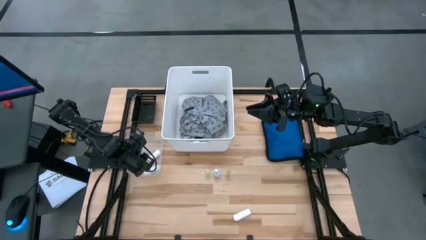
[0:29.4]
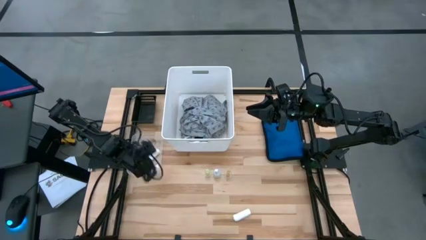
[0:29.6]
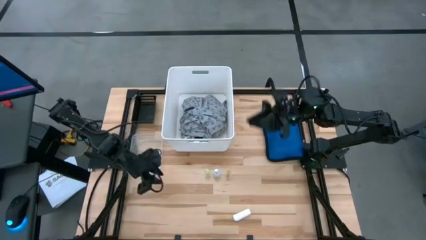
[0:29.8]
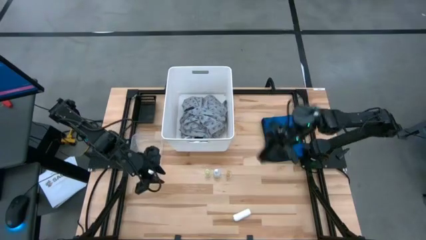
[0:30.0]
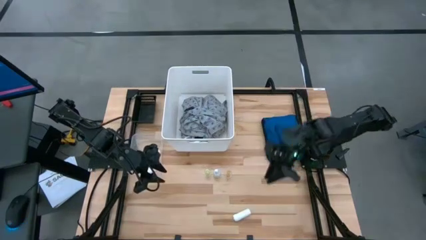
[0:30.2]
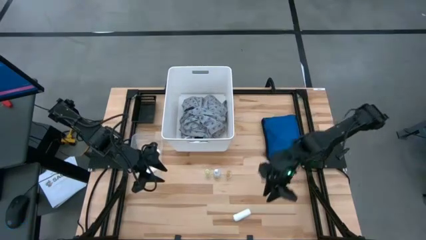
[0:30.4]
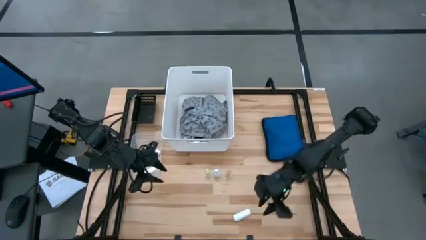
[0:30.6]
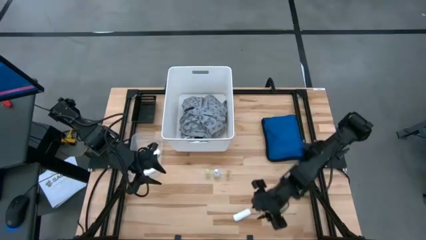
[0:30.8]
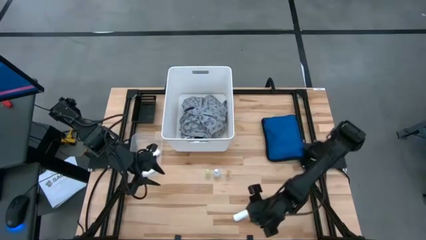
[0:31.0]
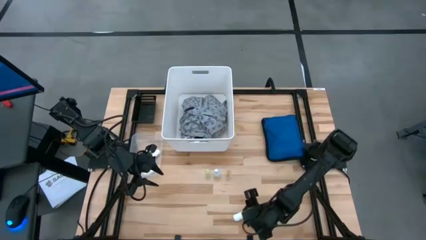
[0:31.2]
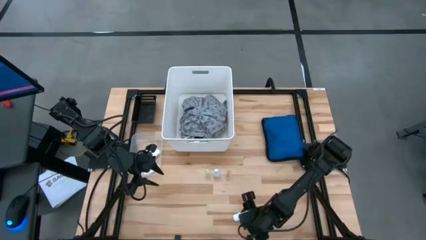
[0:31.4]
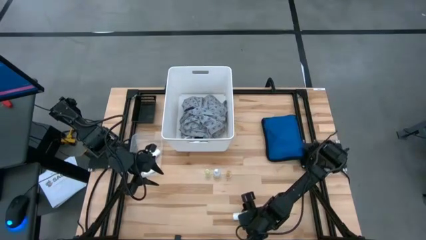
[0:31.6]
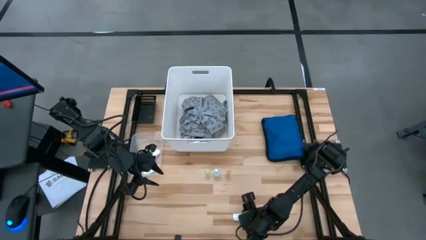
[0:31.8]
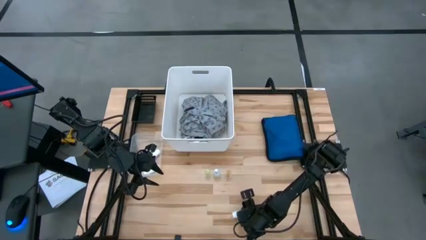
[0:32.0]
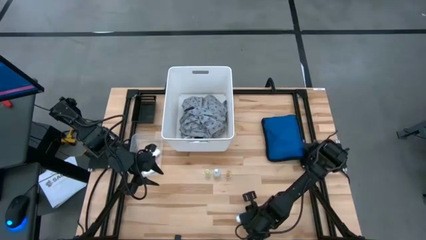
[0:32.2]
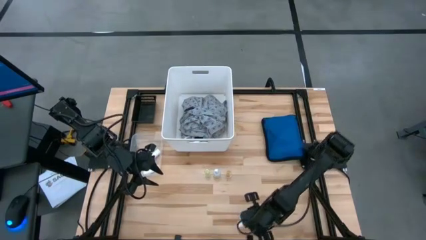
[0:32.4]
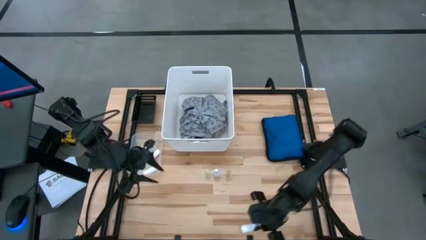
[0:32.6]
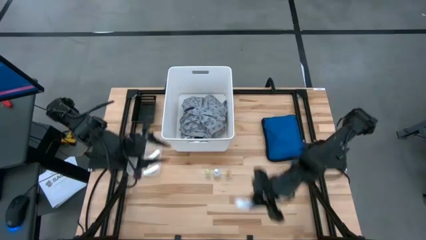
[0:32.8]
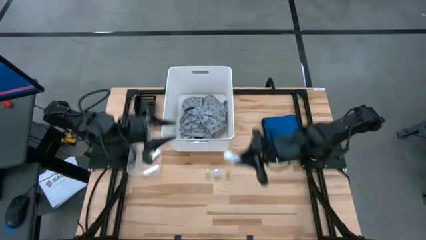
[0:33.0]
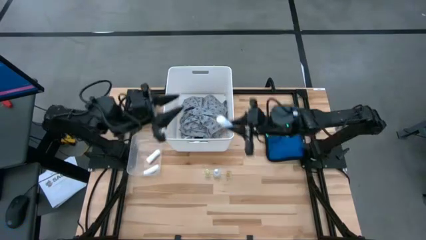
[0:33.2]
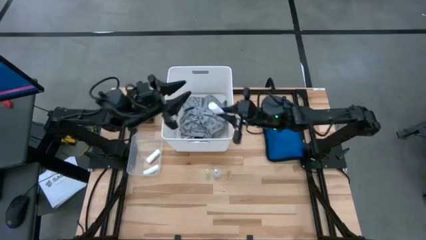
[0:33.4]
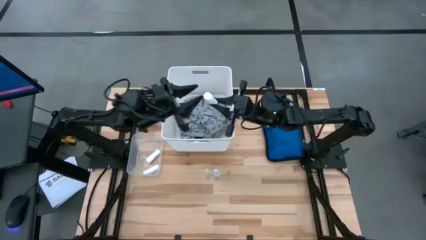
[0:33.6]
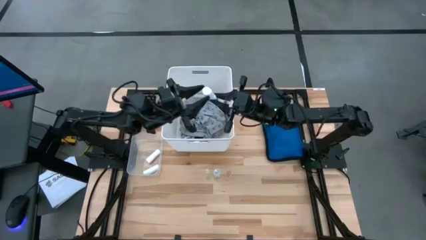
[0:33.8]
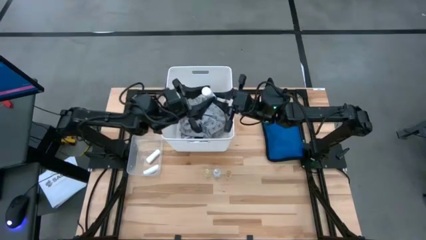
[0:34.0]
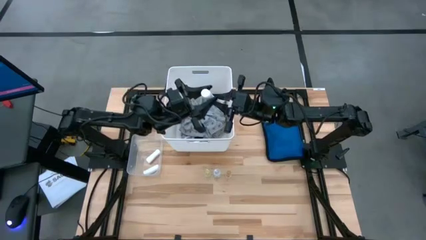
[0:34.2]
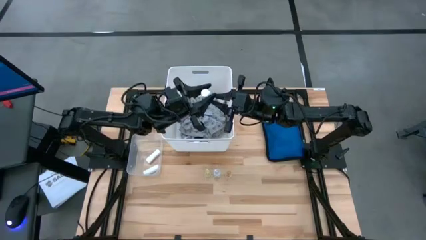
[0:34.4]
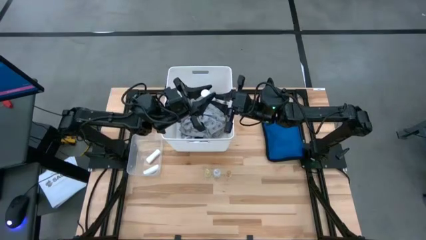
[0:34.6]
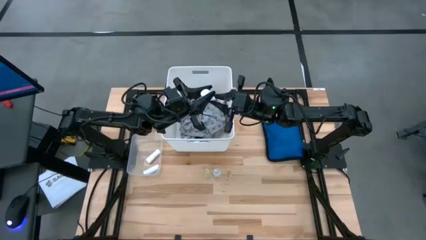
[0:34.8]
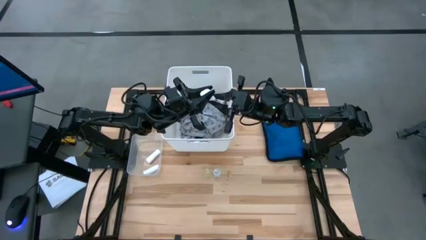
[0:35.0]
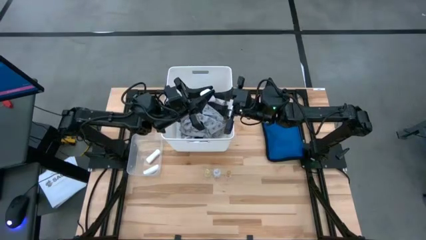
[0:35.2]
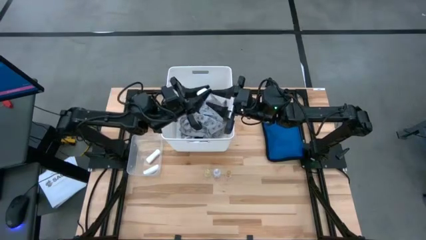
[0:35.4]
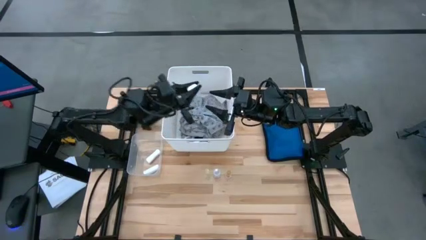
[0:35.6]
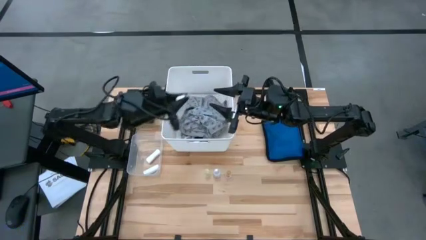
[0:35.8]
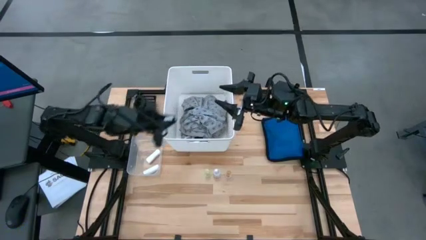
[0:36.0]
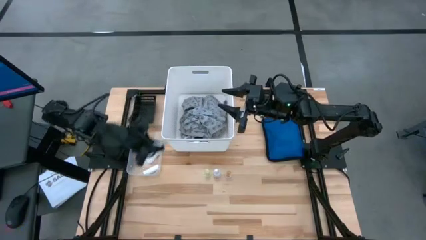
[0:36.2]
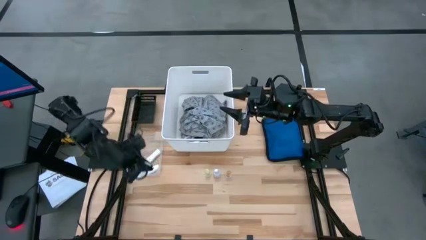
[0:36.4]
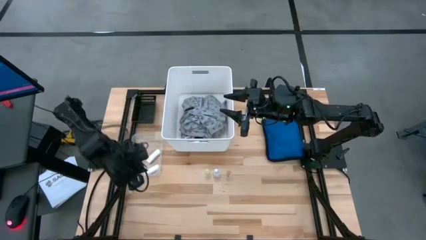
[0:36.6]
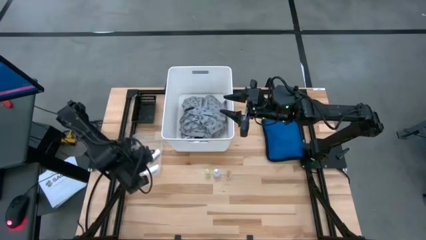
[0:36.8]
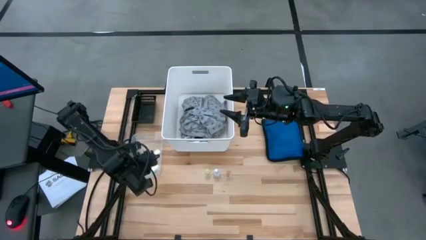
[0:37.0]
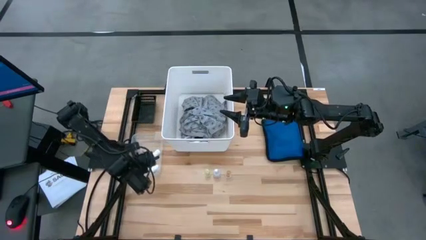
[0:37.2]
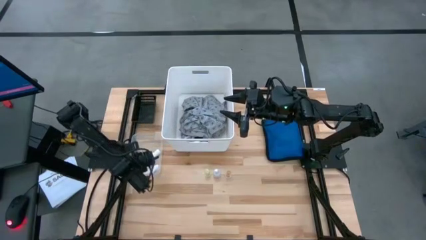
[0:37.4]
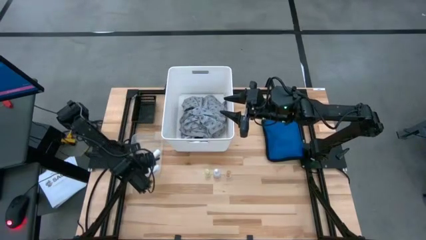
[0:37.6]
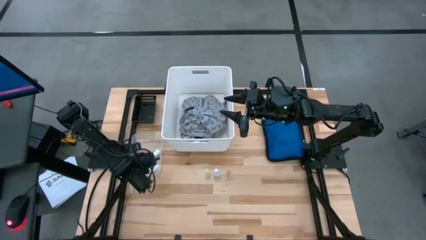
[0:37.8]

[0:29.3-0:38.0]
Task: Pick & Place Medicine items
Put the rolled gauze into the transparent bin

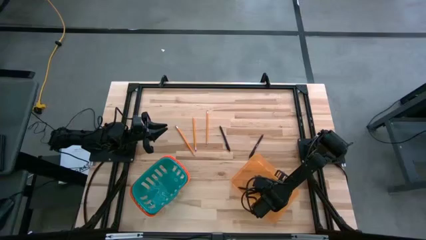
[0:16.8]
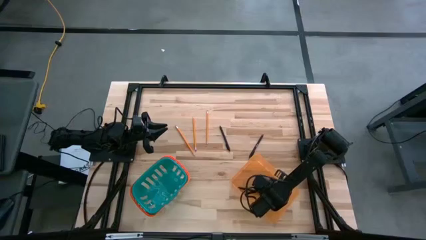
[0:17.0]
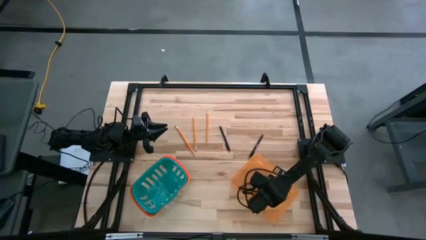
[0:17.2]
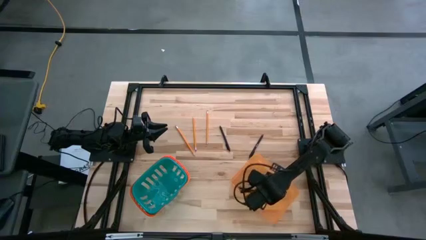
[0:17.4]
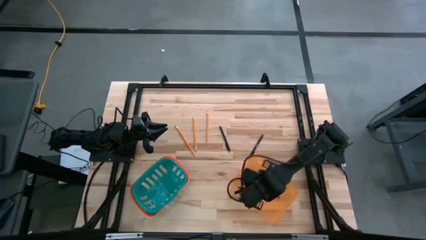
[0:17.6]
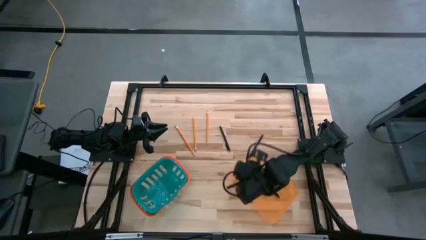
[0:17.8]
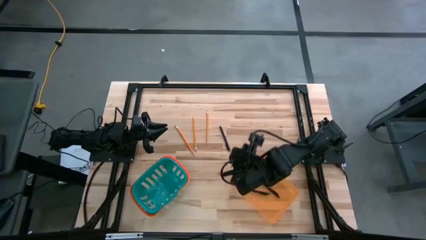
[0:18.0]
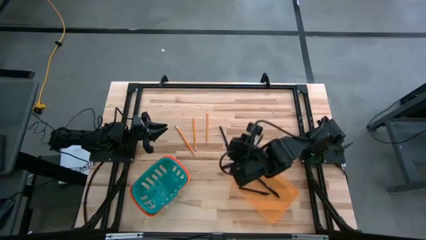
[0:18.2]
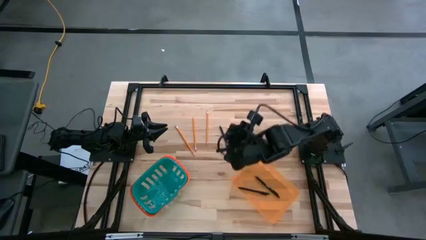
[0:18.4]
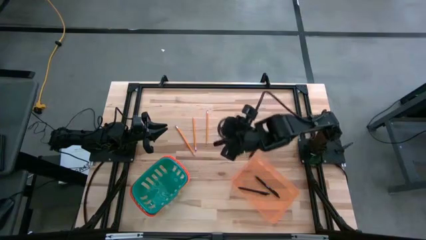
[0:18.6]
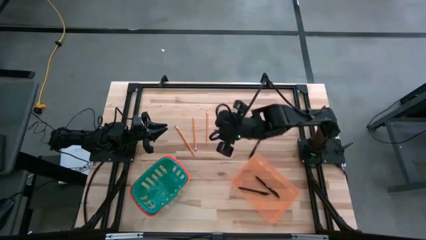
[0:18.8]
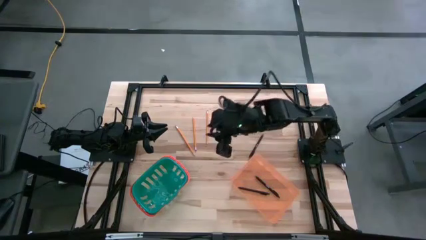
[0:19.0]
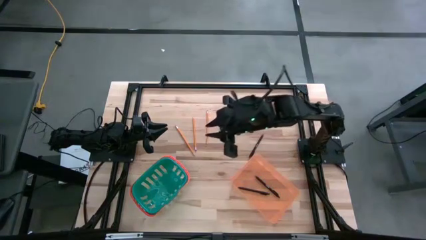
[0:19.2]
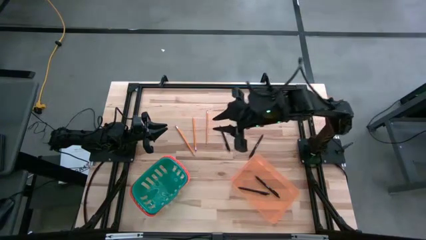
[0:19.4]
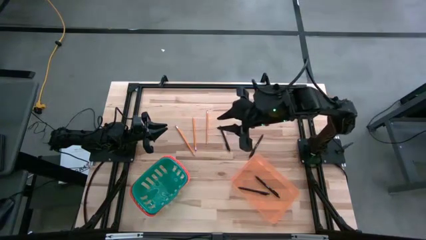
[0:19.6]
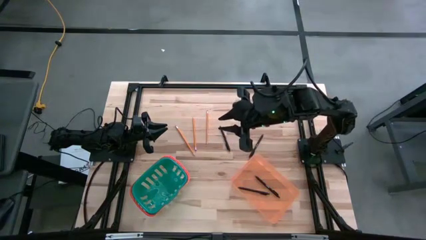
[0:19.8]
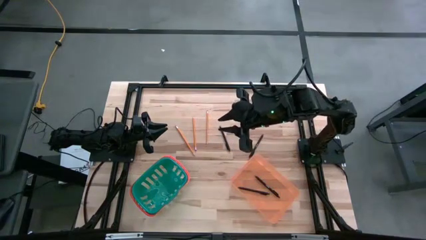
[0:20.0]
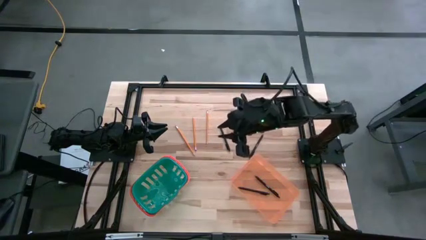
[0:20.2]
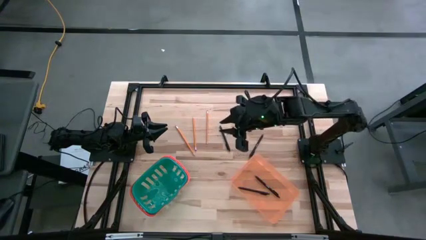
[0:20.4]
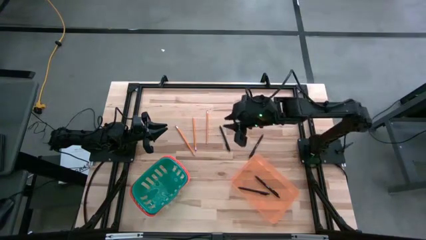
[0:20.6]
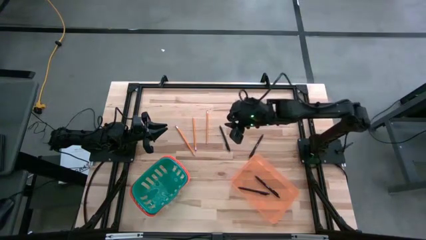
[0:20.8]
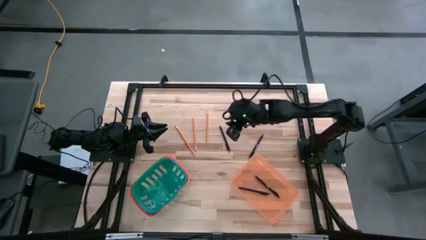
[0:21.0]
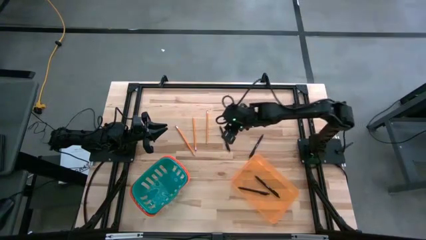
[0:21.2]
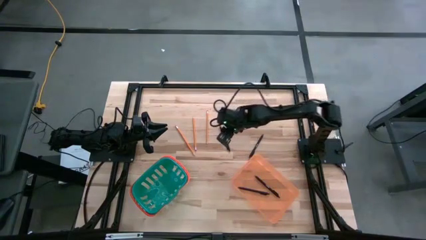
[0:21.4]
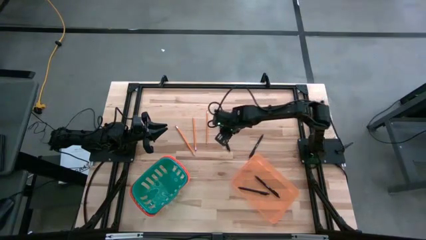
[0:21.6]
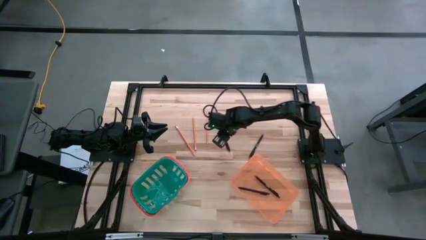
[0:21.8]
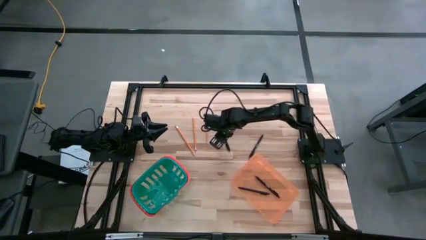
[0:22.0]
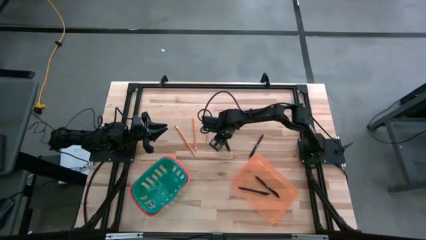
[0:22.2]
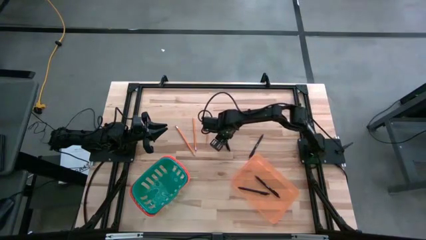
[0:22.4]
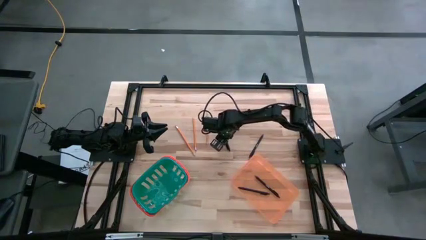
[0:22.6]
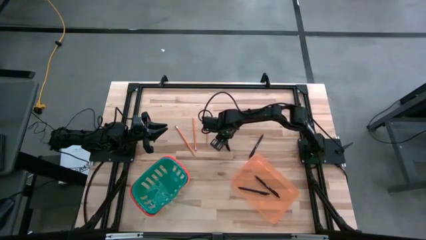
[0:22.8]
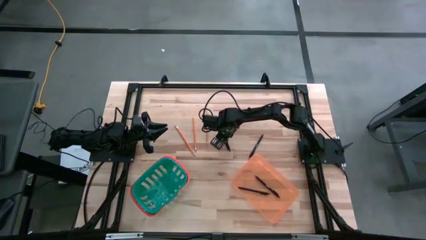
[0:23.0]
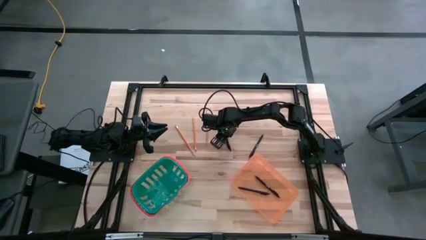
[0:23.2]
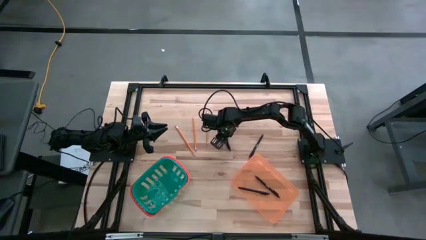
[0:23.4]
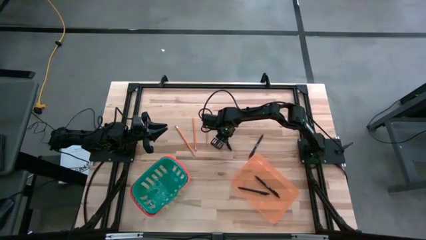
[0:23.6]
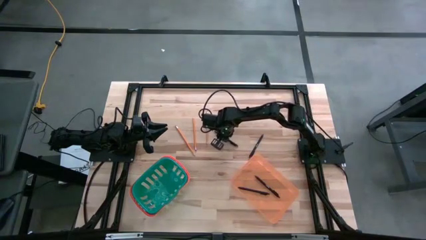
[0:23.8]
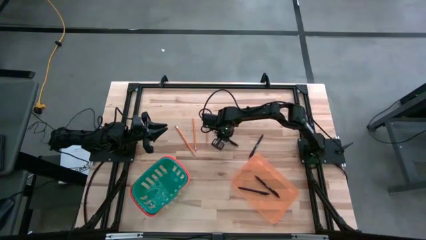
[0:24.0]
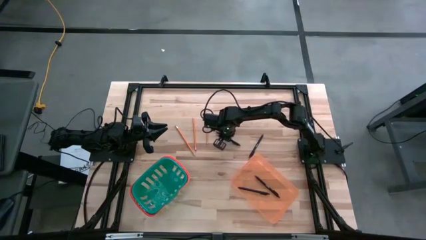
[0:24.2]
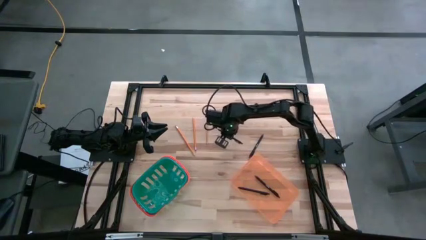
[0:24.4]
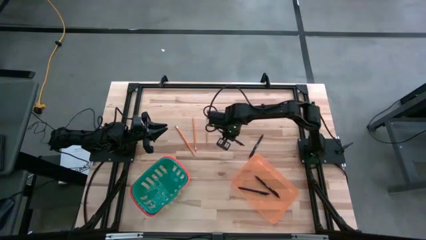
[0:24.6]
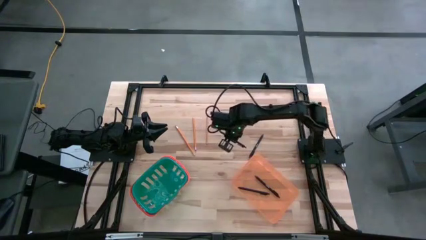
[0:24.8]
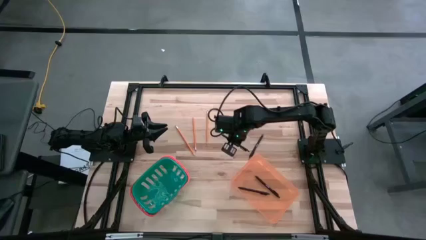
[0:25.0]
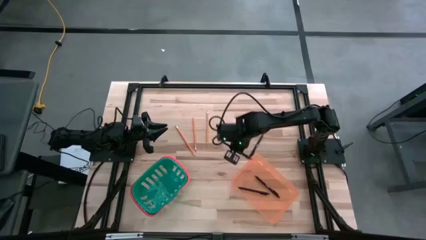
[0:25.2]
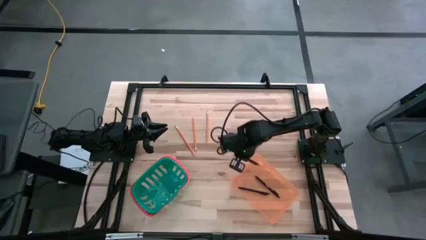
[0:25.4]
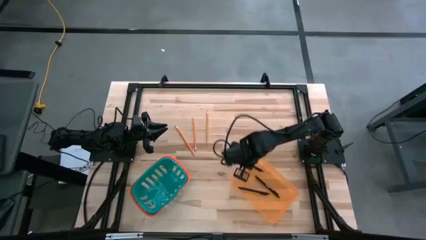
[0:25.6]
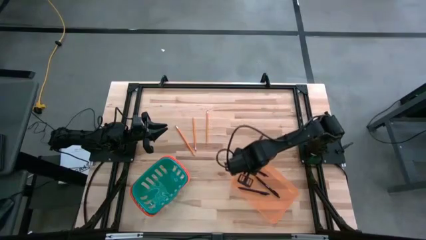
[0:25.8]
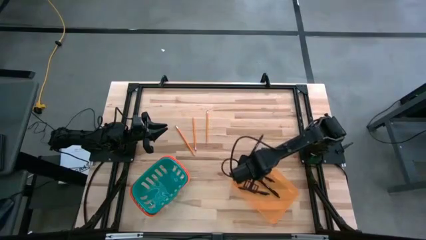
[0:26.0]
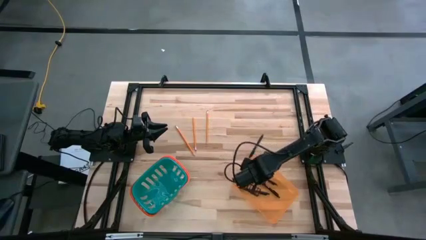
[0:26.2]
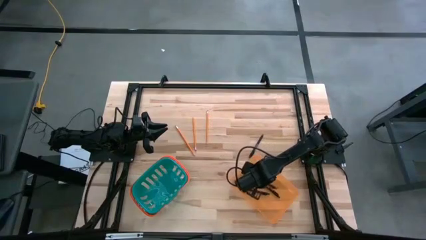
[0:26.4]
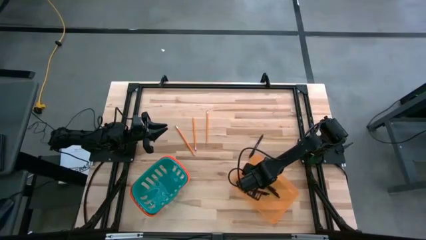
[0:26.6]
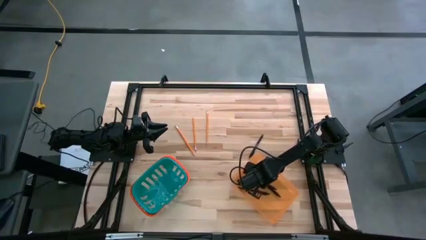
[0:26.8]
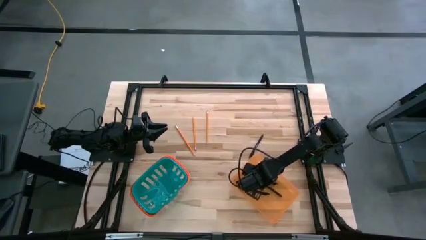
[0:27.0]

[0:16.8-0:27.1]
Task: Sort pens & pencils
Put the black pen into the orange bin
